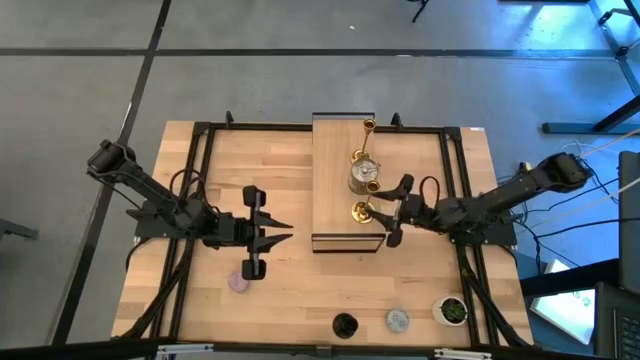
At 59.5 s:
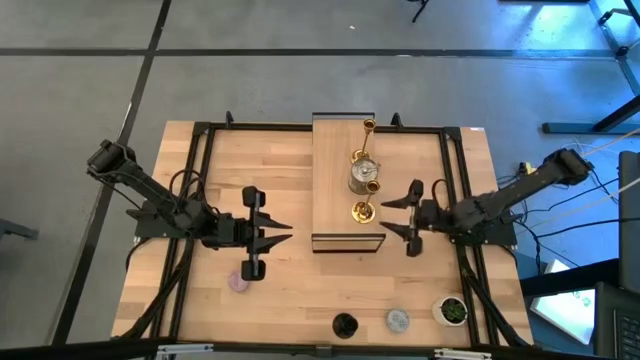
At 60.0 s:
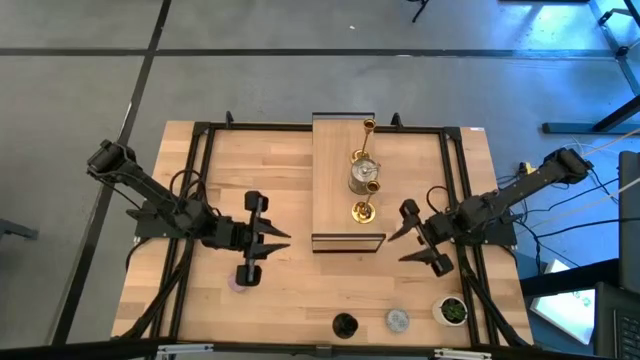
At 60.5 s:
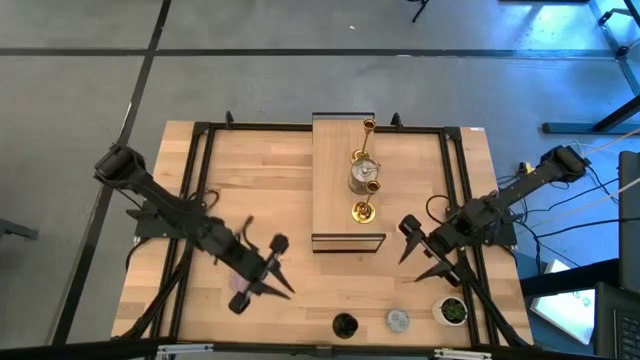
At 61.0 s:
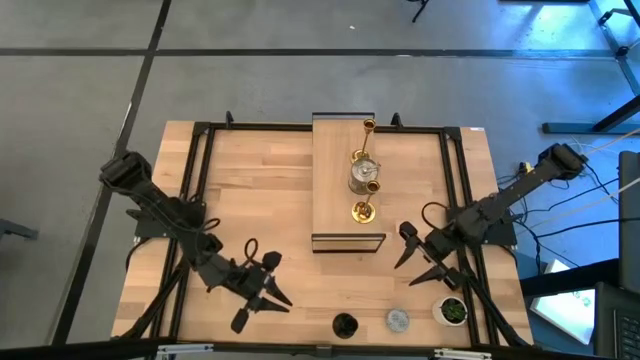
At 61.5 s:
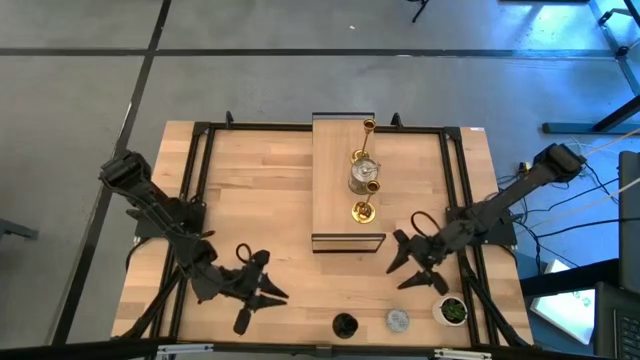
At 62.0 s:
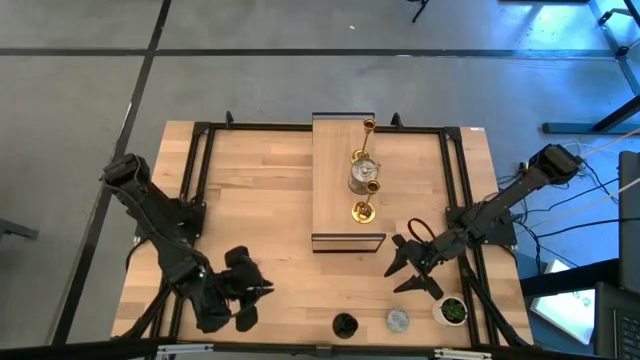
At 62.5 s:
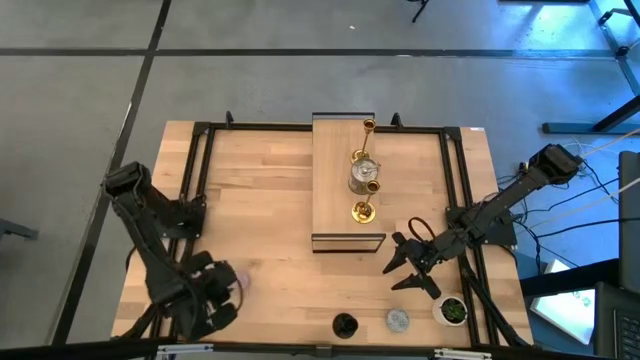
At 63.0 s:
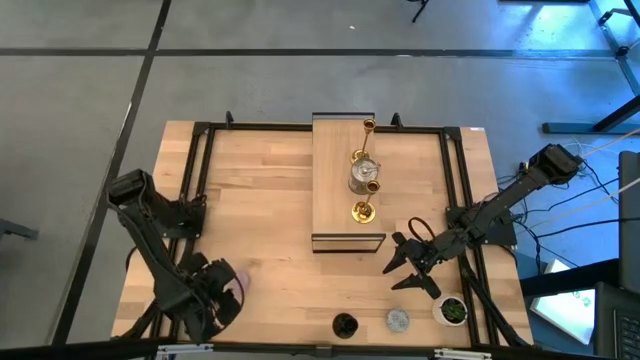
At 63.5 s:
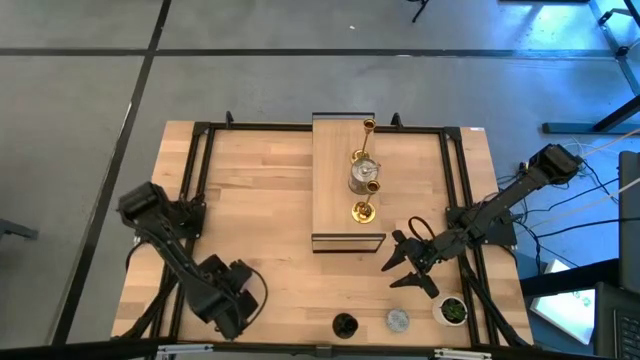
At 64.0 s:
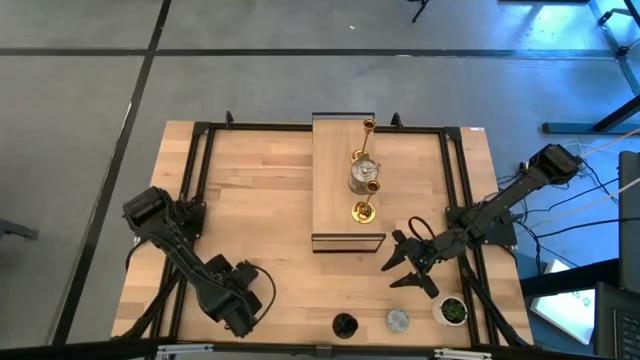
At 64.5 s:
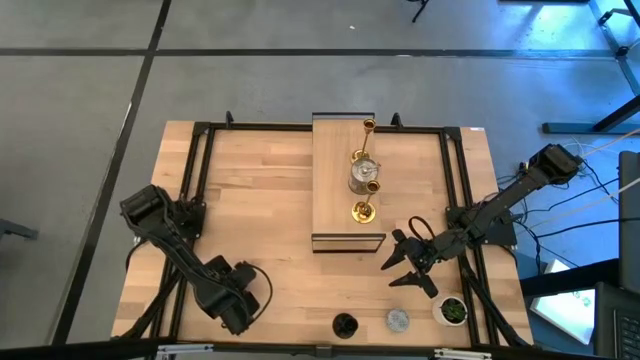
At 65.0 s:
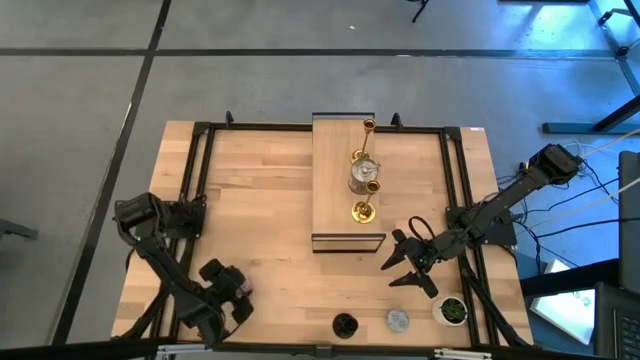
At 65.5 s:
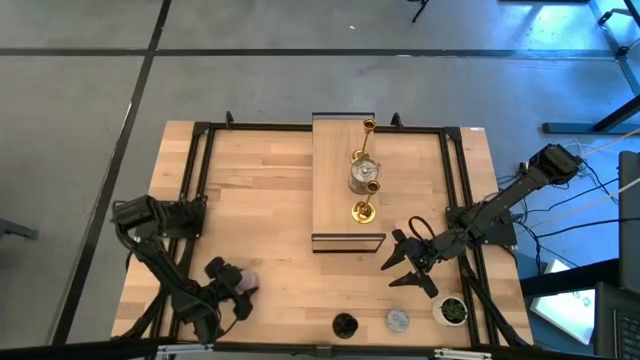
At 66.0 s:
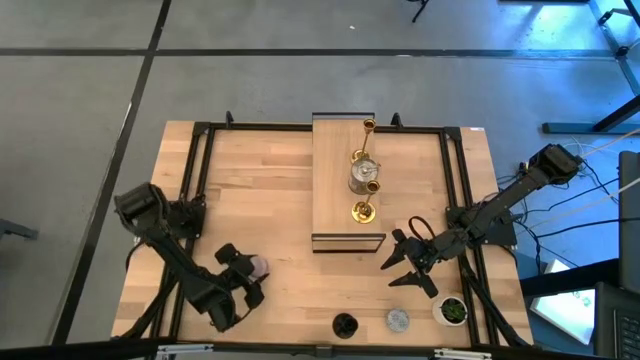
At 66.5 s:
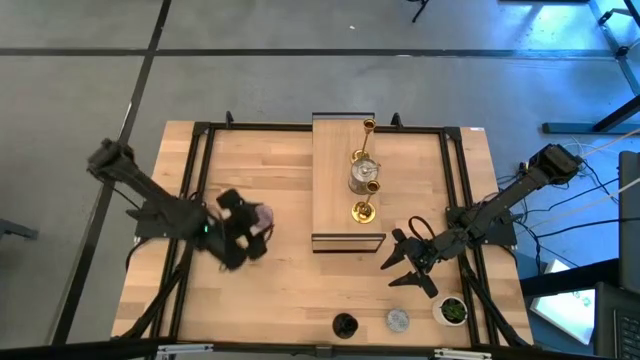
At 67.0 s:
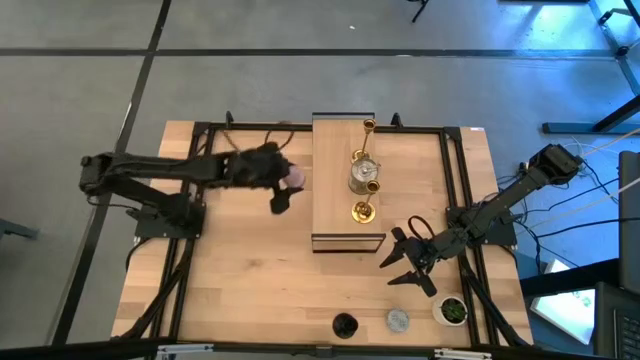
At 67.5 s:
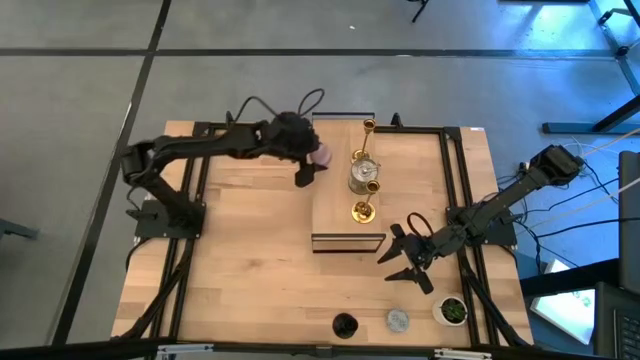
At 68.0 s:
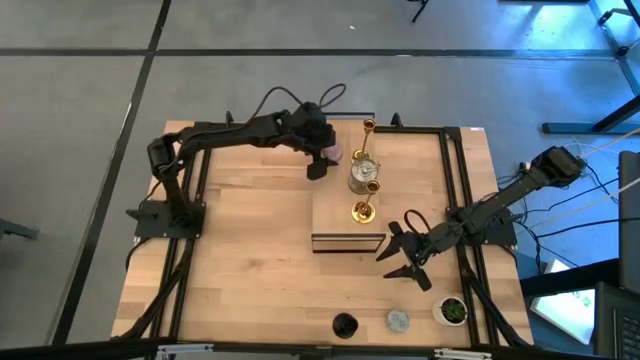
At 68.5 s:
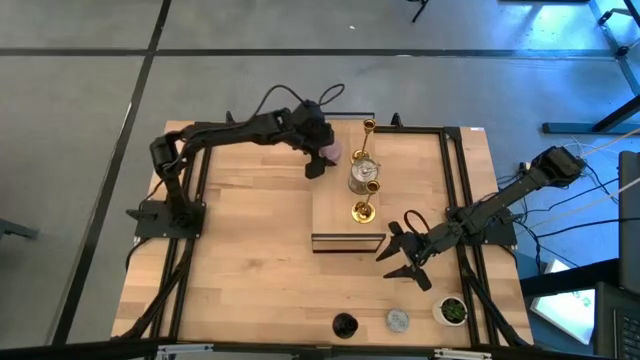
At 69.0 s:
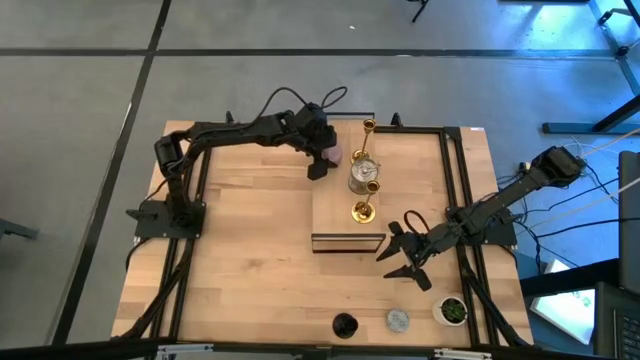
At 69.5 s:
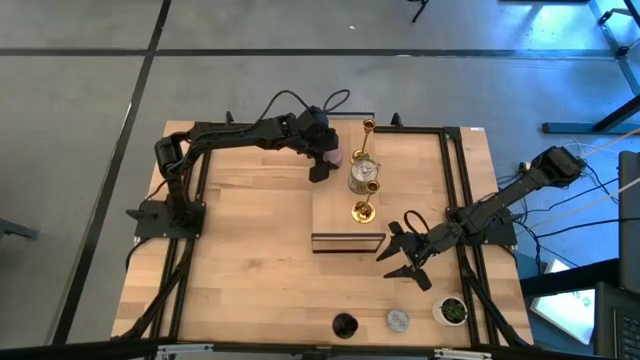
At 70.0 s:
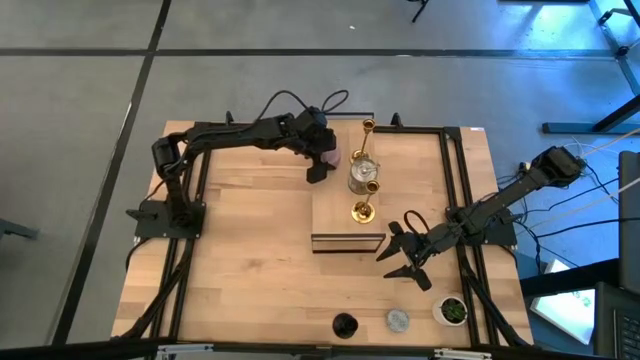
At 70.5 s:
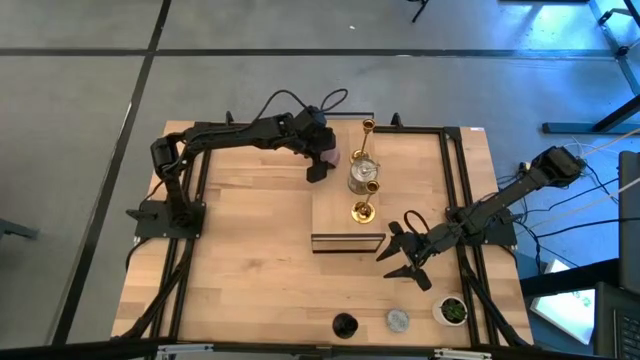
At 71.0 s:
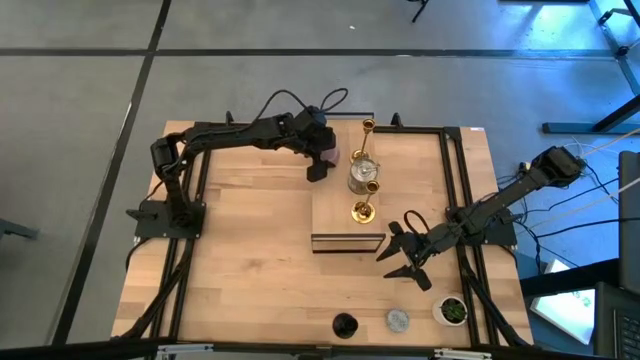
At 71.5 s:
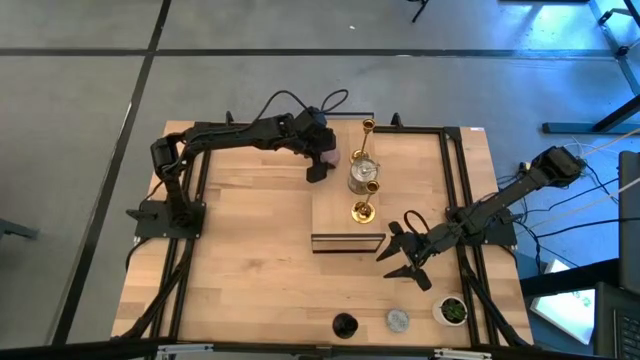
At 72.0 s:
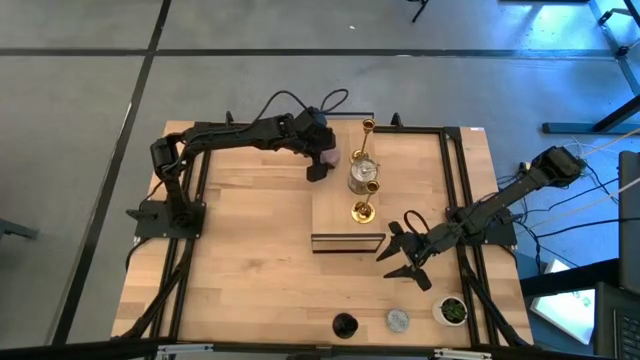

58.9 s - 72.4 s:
Task: Pick & Place candle stick holders
Put the violet patterned scented candle on the shelf

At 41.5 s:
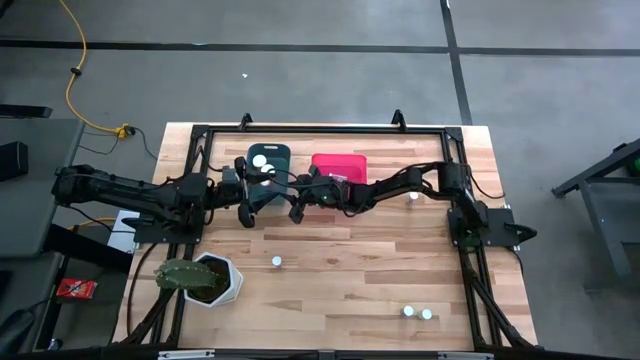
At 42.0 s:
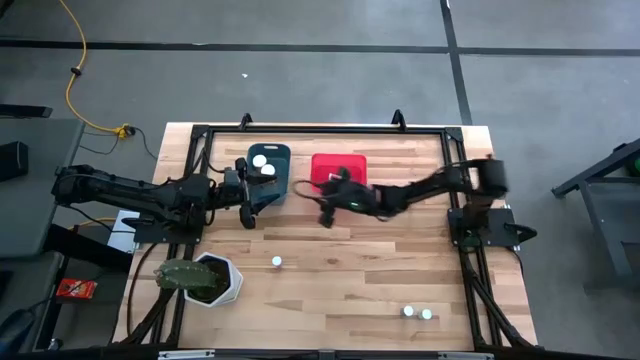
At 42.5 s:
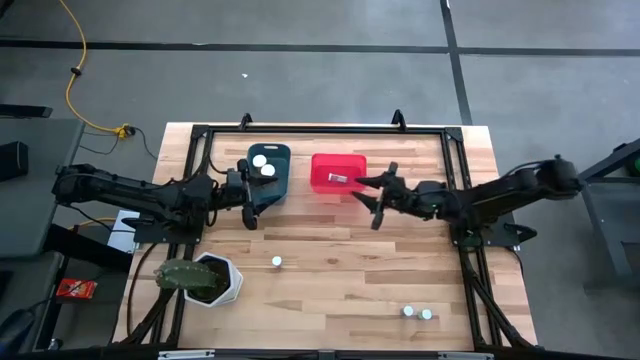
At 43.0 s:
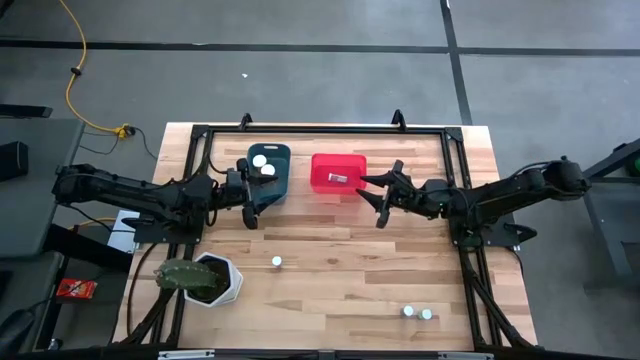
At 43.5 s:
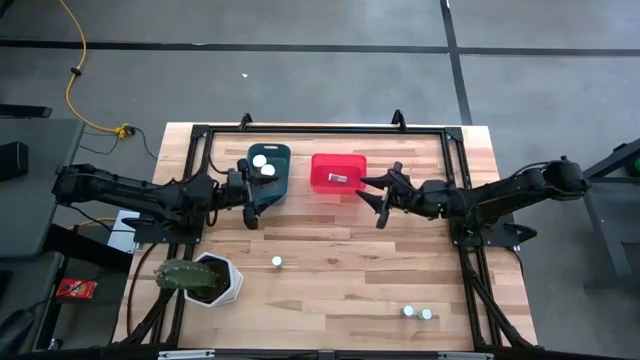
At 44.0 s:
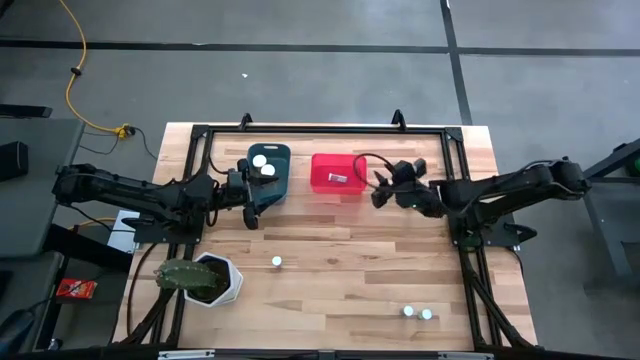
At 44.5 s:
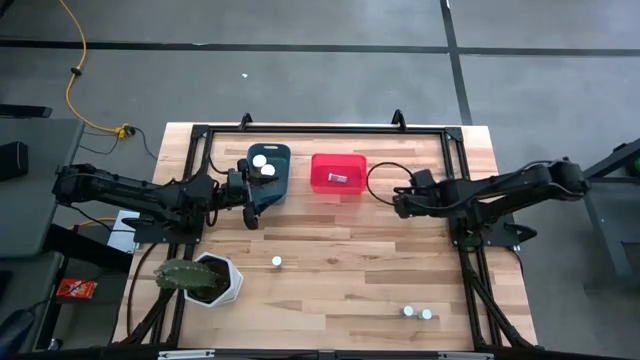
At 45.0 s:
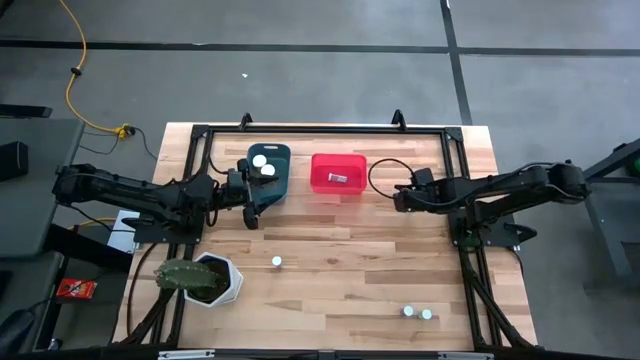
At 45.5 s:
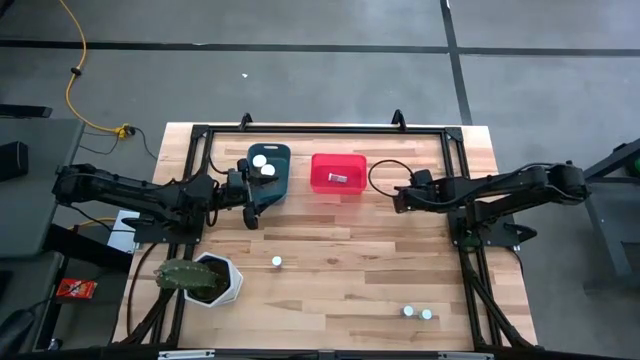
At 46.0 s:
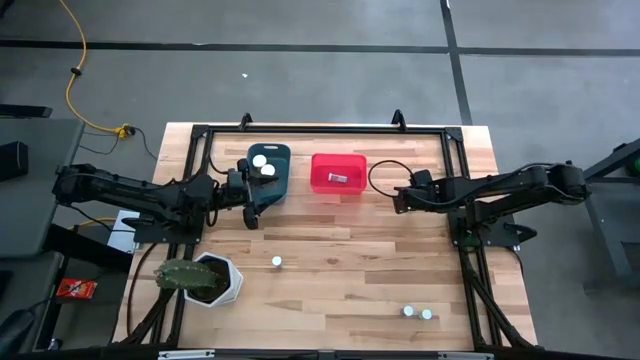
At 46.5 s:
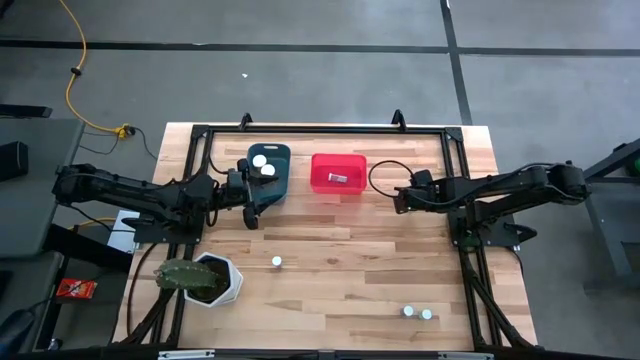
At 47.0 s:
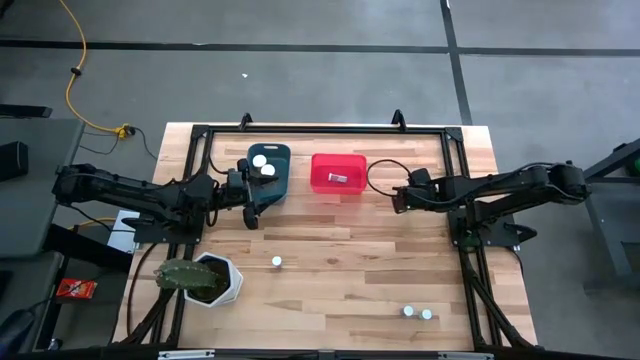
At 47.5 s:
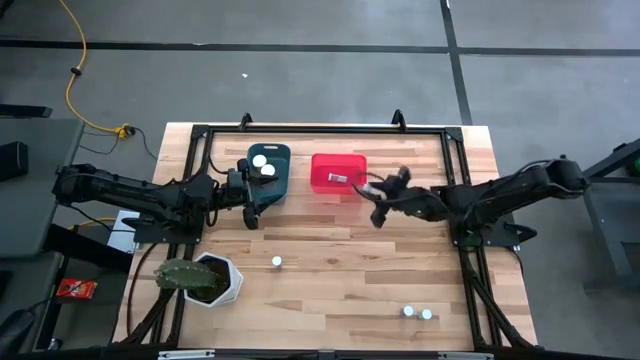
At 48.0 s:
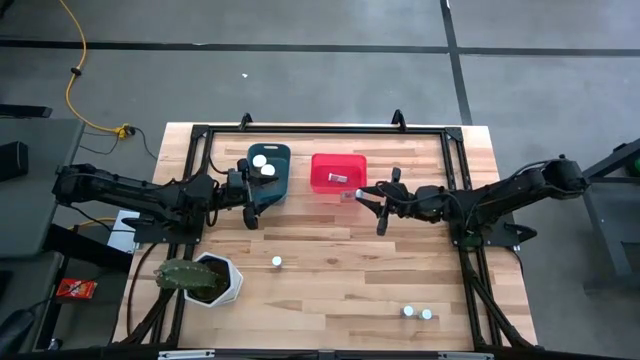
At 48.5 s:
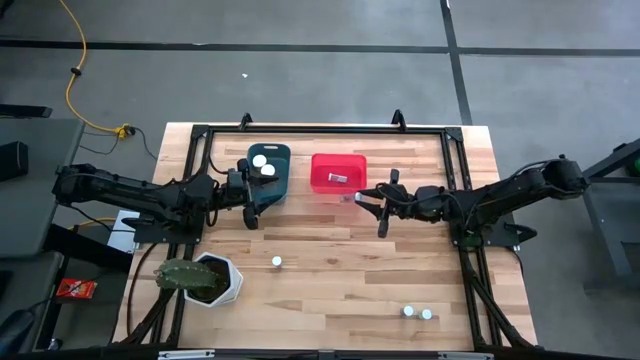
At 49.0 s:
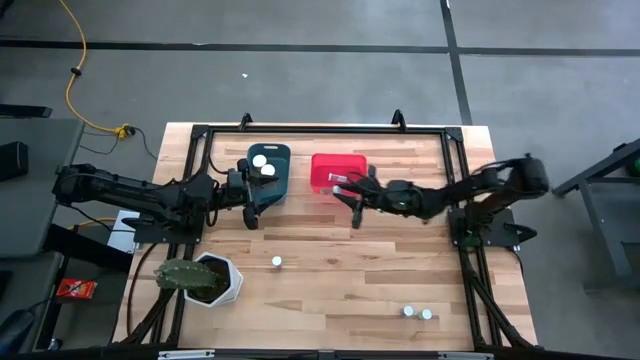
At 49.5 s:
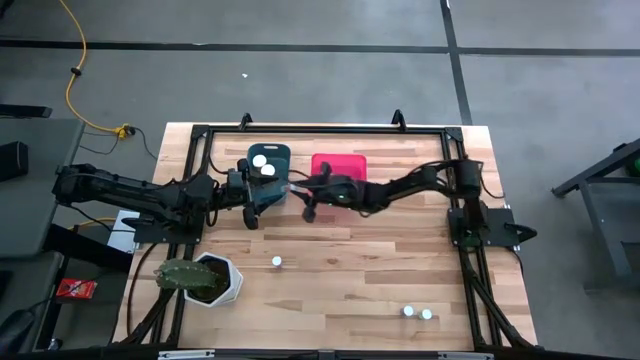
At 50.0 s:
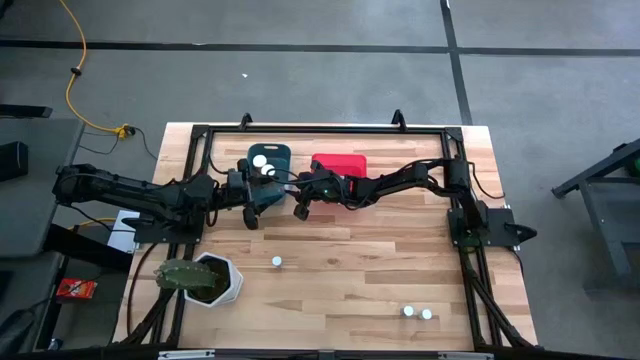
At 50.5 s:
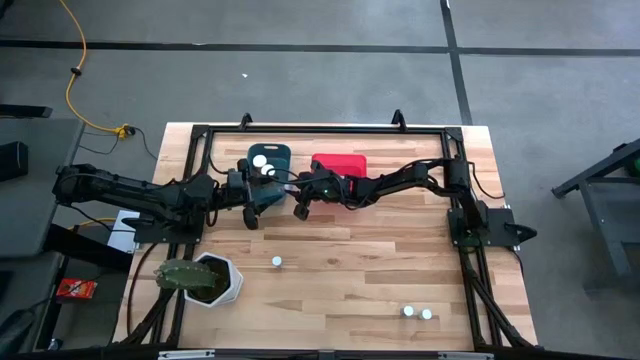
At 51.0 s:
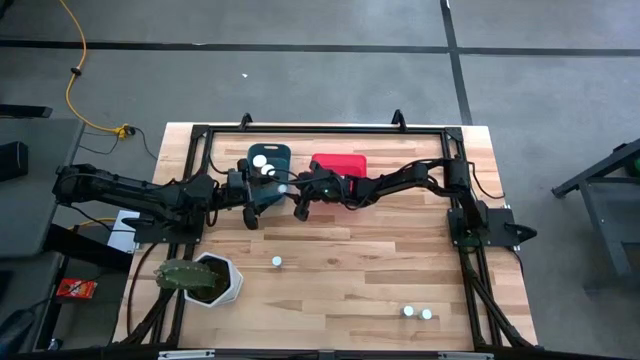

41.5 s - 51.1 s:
Task: Pick and place medicine bottles into bin by pill shape (circle, oval)
Put the top right blue capsule bottle into the blue bin
